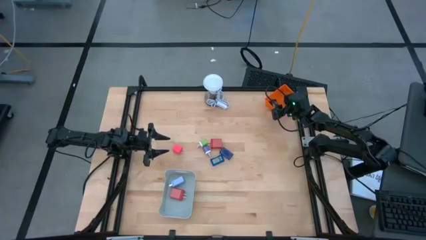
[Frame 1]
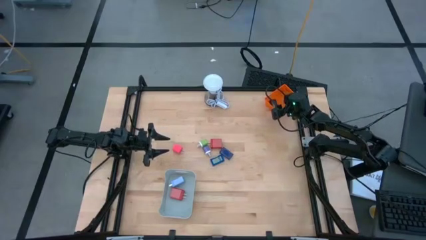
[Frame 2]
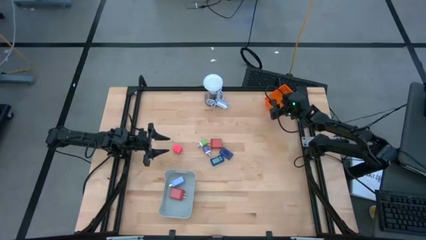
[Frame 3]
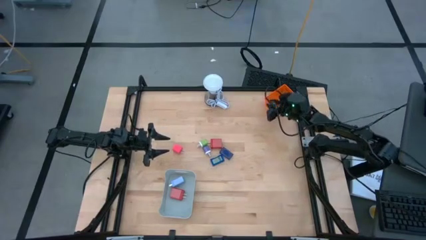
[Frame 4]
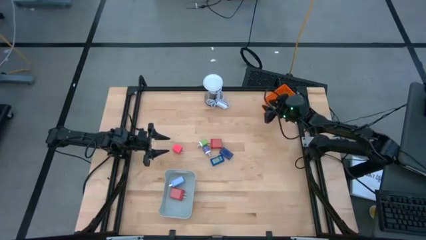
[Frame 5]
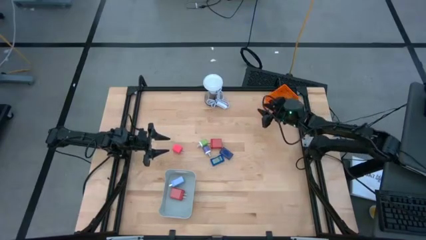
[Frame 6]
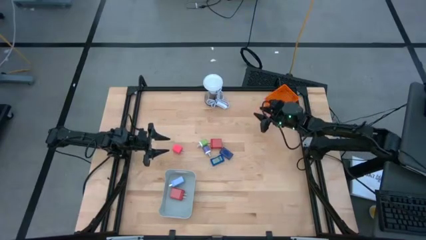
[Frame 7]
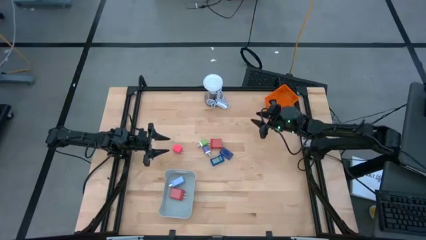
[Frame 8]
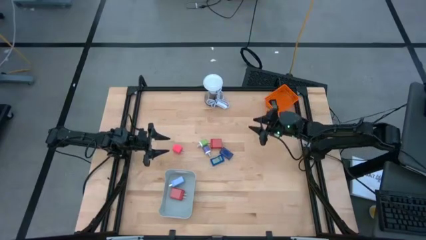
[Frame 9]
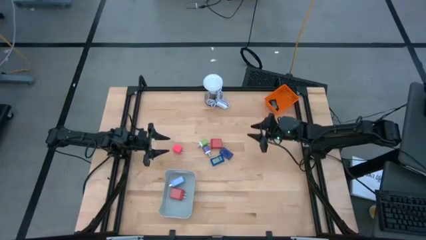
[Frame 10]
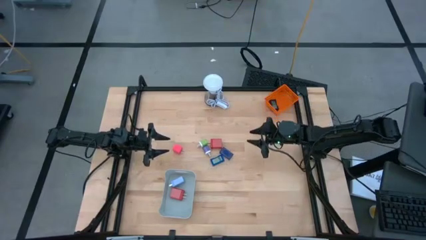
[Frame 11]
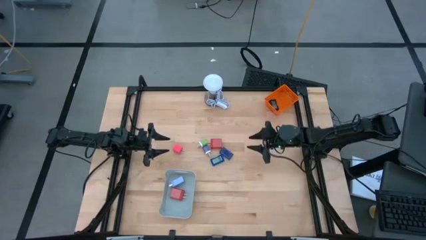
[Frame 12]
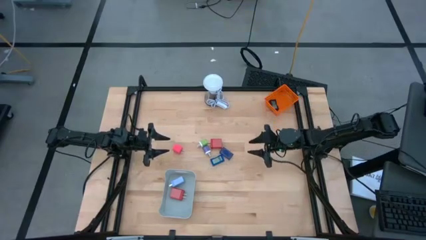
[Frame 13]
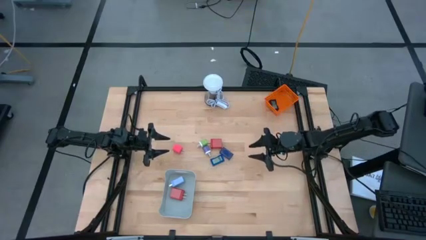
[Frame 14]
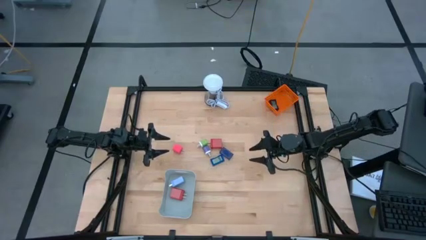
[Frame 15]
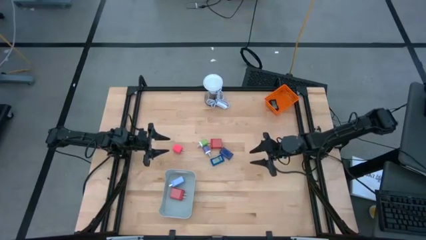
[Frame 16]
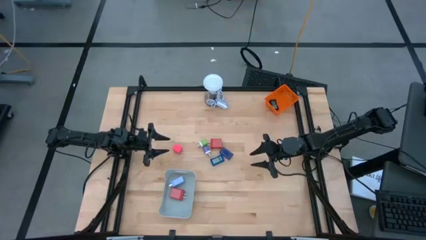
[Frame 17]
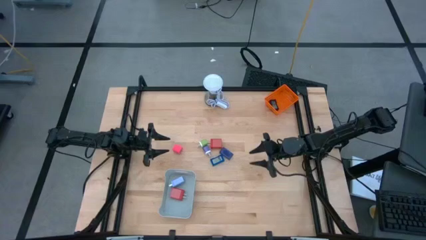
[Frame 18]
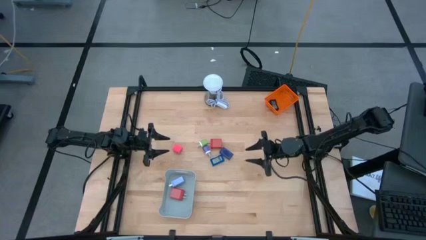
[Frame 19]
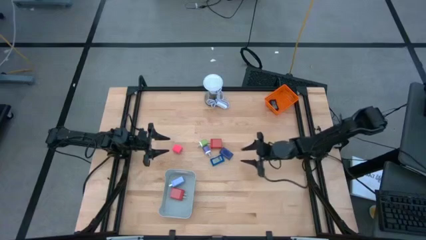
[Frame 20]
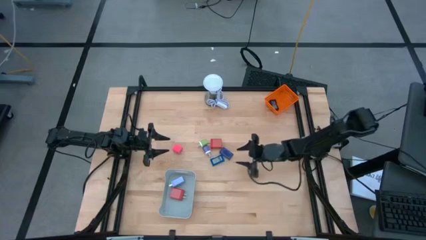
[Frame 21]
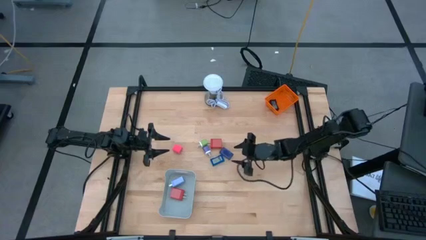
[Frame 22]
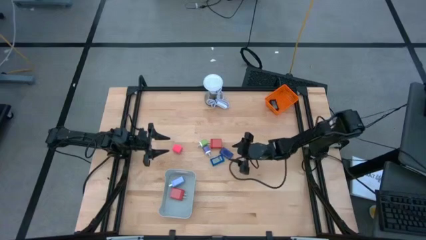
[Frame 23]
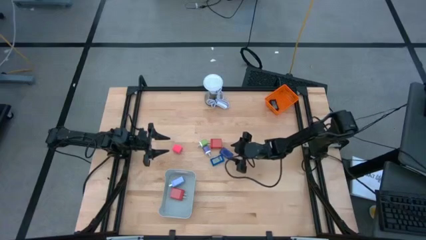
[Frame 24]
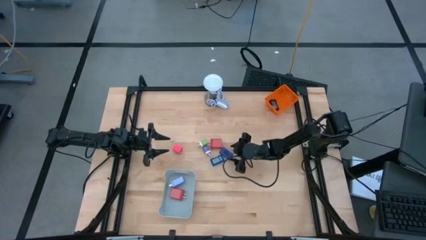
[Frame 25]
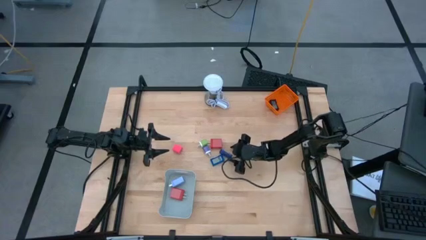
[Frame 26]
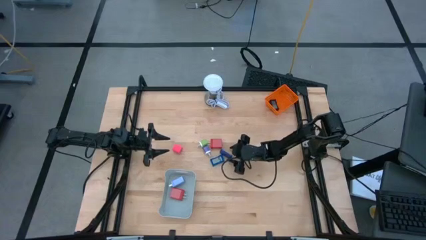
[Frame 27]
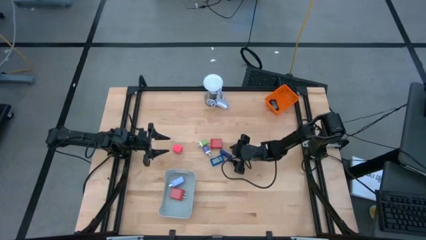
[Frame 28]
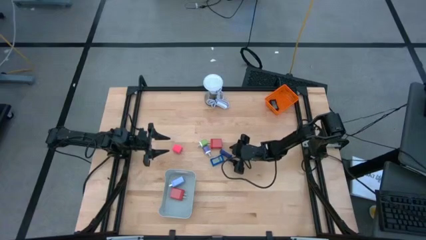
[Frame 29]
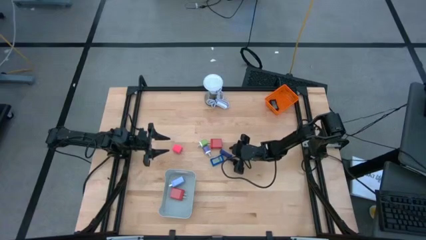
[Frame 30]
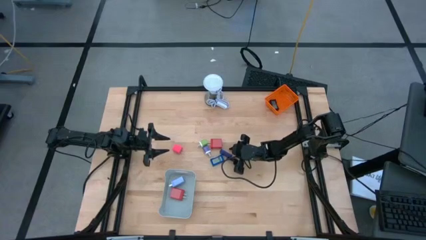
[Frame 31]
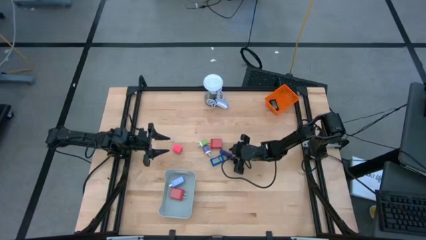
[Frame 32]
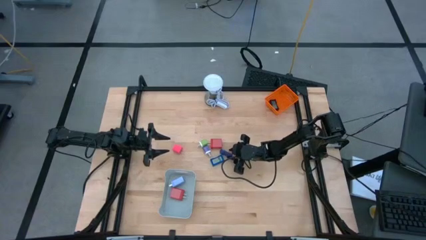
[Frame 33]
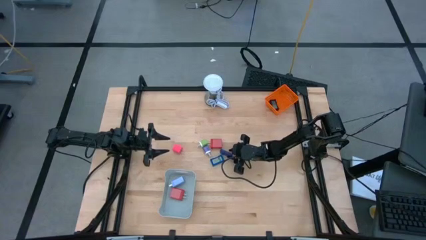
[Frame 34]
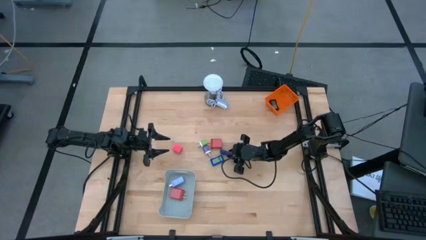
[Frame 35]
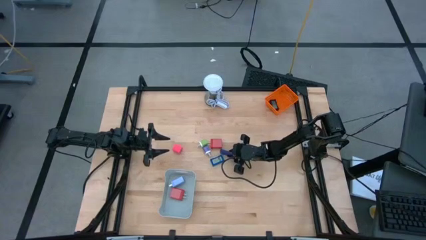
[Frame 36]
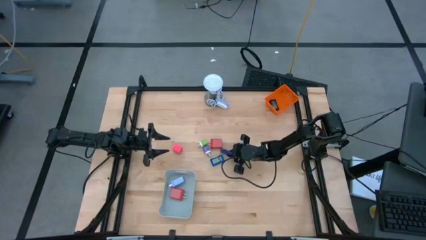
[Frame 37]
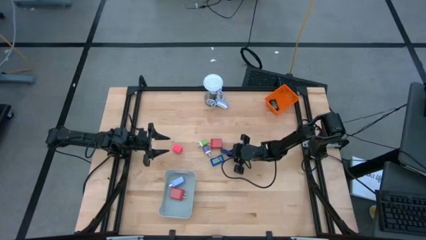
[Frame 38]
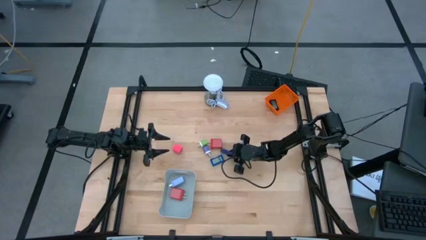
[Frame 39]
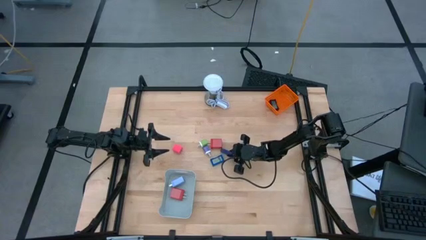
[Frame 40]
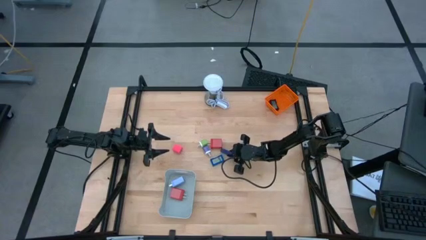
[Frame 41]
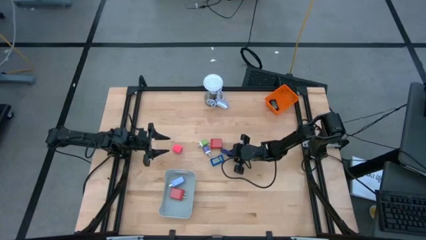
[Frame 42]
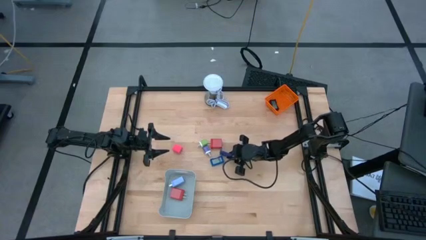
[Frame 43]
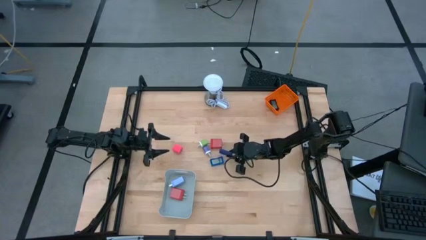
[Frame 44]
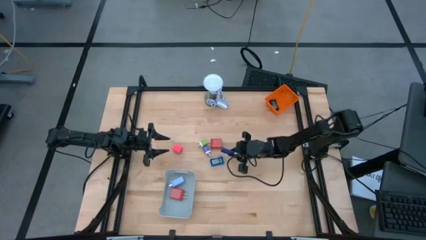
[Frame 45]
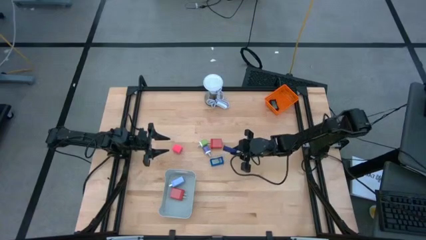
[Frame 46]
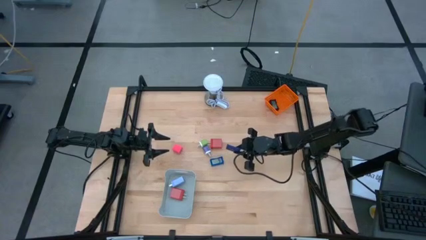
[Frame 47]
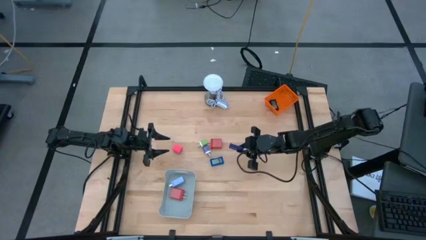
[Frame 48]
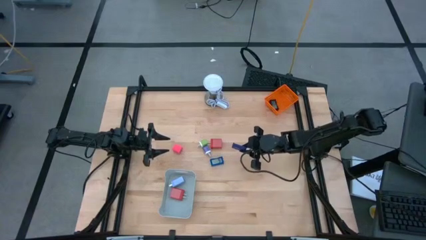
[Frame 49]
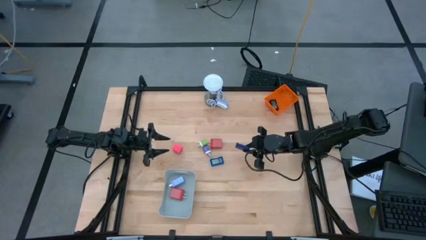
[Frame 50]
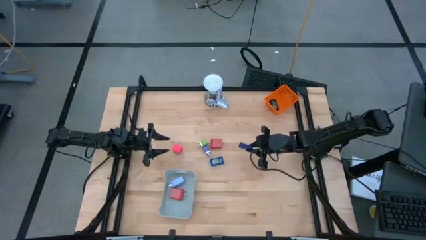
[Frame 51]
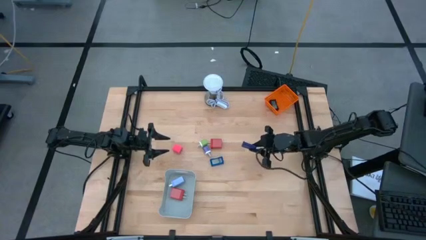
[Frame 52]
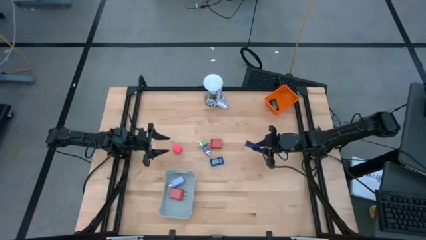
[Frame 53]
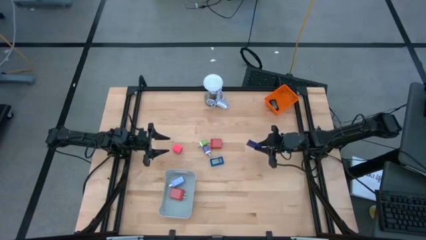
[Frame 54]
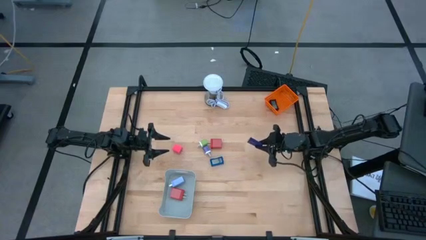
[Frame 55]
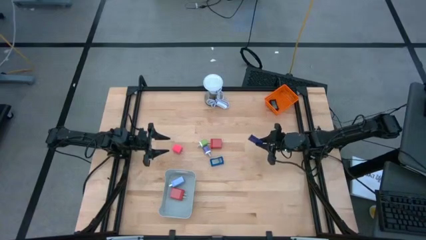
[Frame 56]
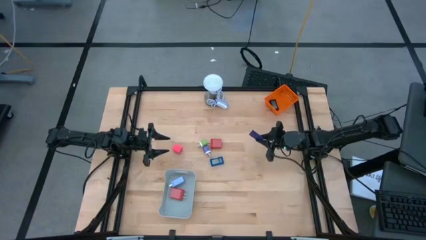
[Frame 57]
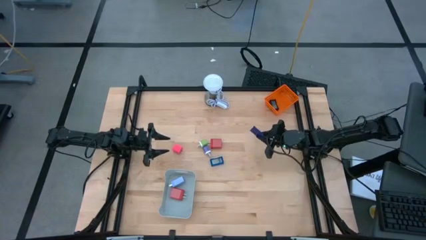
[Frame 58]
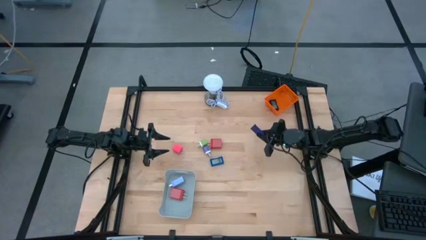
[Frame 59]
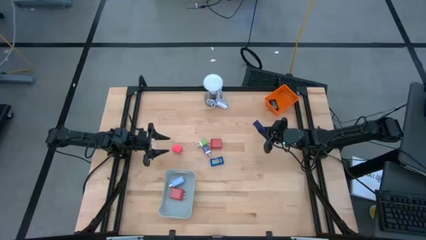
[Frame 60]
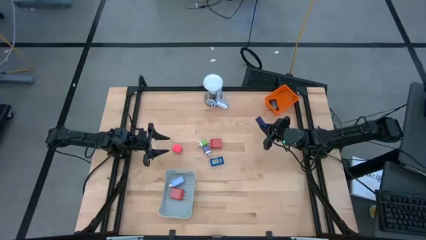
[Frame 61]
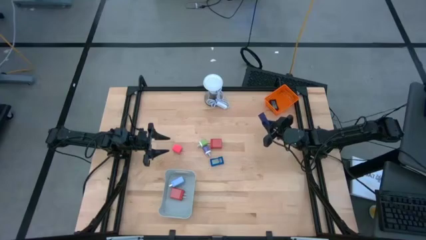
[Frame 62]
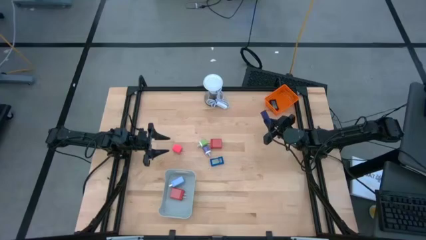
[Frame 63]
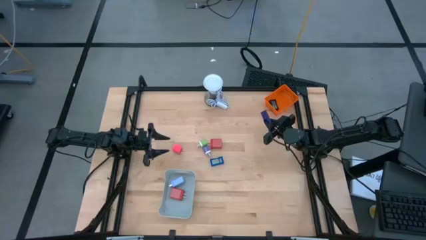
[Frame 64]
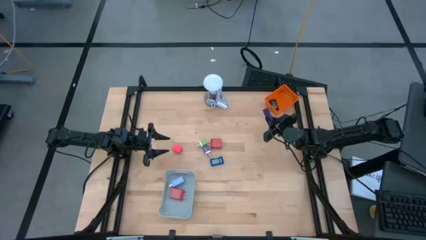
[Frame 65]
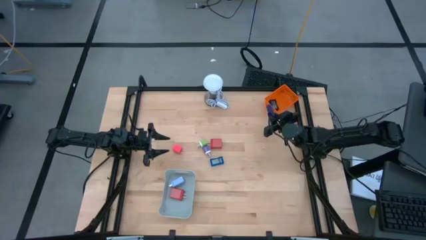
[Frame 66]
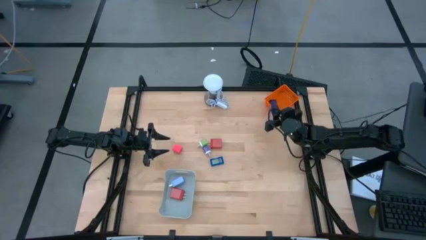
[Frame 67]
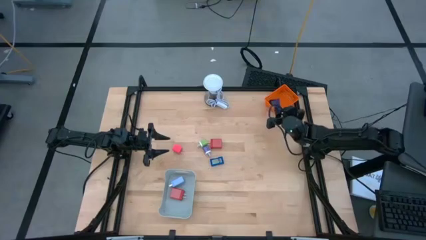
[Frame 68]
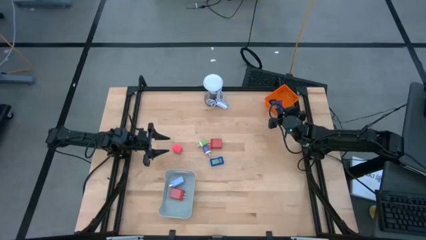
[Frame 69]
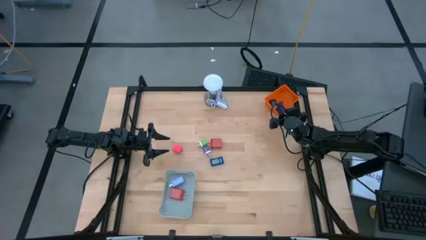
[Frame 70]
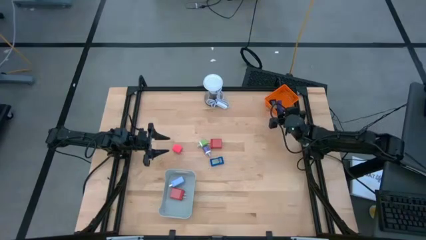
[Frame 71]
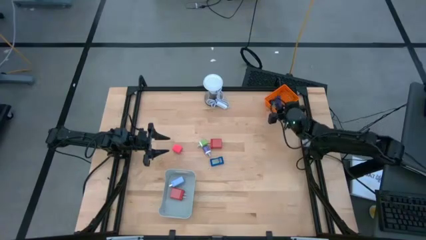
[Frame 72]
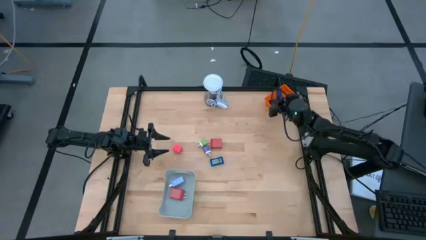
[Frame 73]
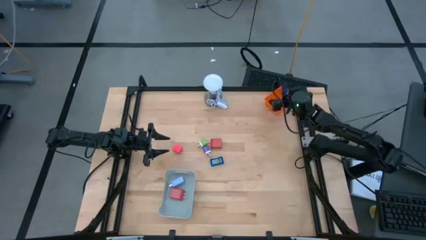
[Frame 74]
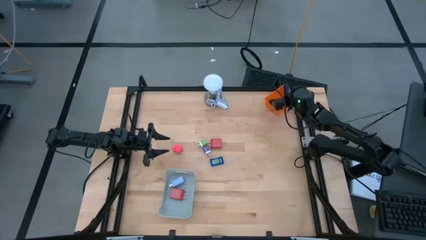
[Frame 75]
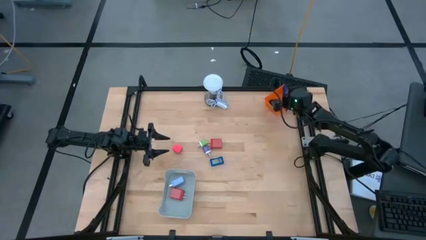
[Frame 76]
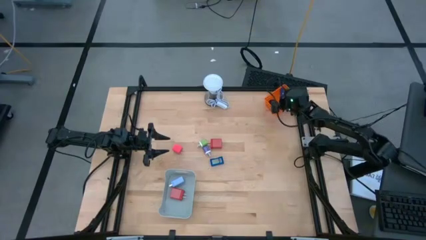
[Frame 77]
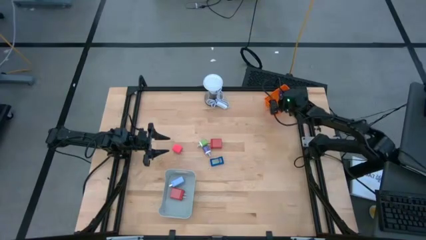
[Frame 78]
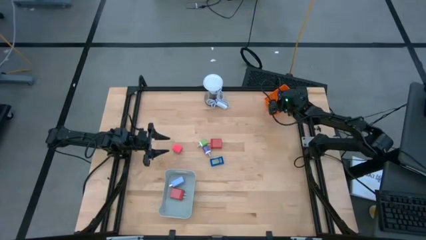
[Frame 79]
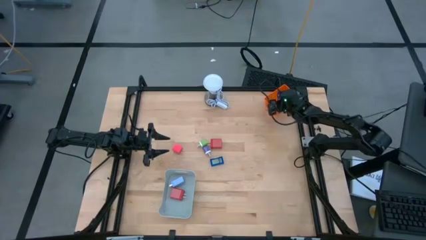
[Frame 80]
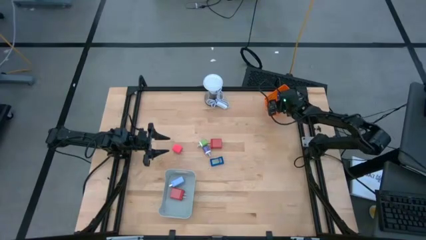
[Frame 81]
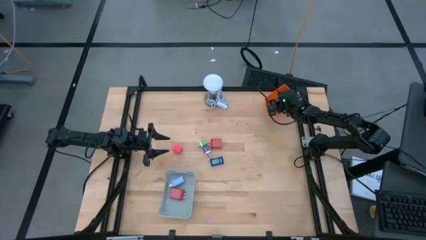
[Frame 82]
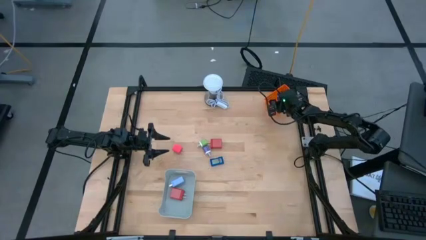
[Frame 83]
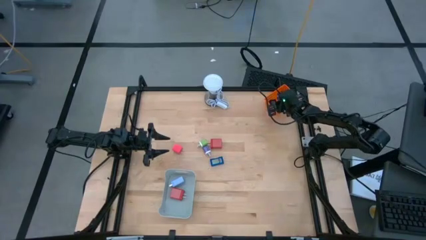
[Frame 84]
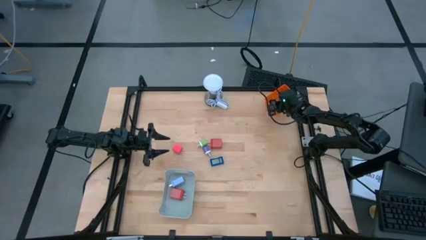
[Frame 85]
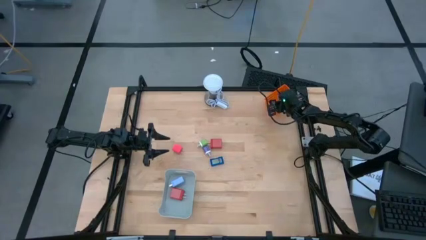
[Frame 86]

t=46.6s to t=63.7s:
Task: Pick & Place Office items
Put the top blue digital clock into the orange bin
